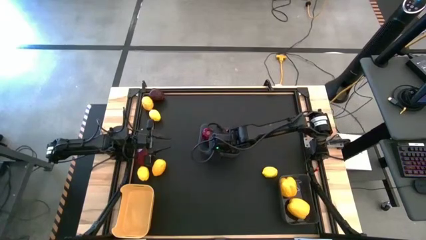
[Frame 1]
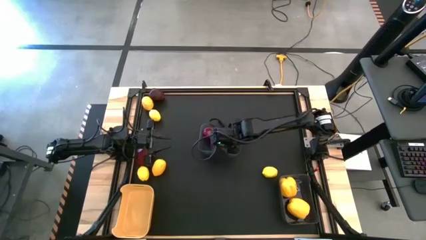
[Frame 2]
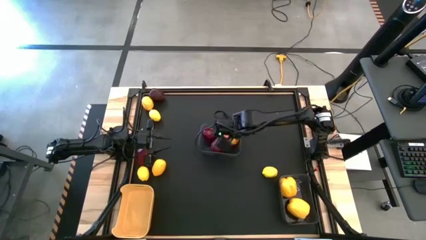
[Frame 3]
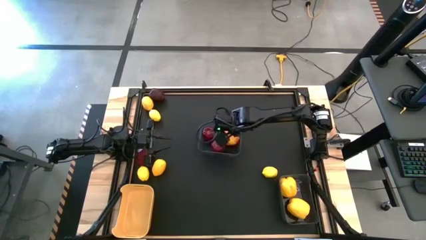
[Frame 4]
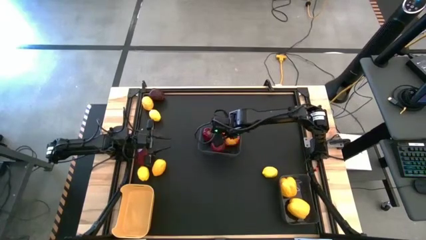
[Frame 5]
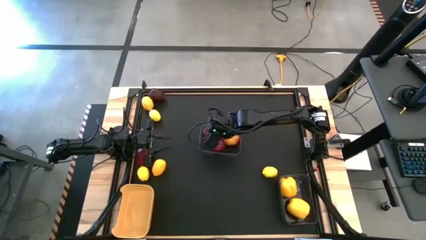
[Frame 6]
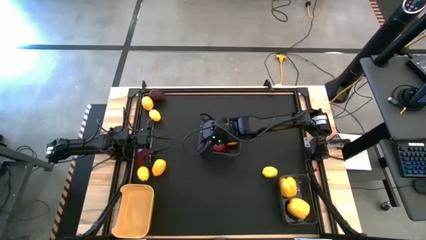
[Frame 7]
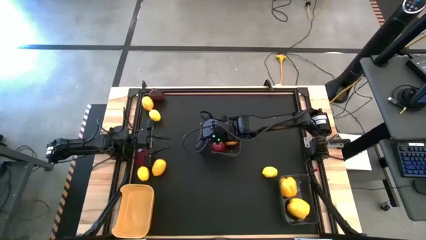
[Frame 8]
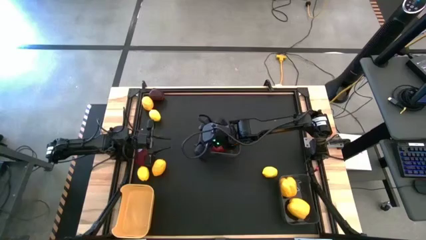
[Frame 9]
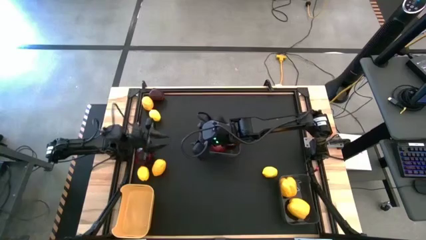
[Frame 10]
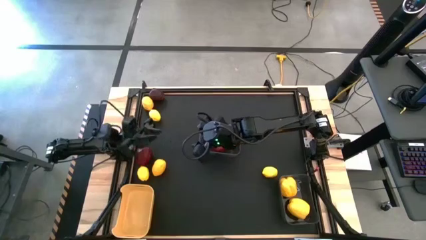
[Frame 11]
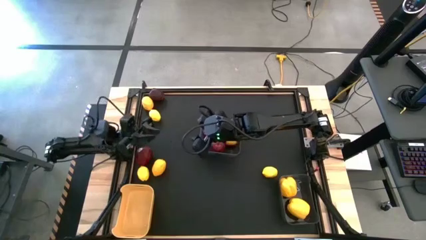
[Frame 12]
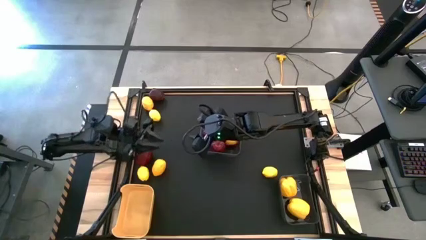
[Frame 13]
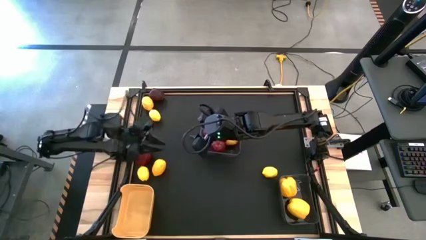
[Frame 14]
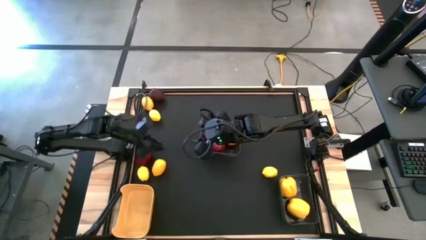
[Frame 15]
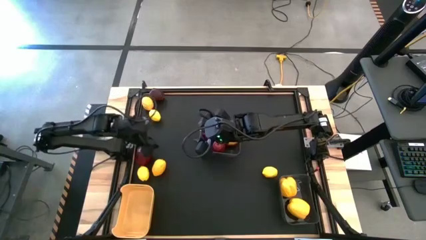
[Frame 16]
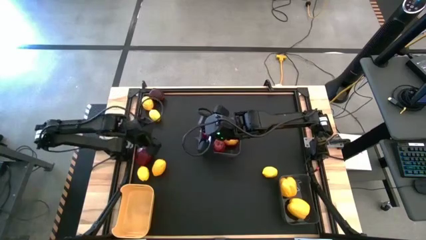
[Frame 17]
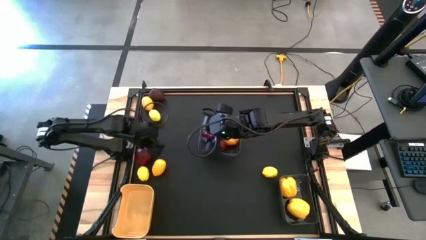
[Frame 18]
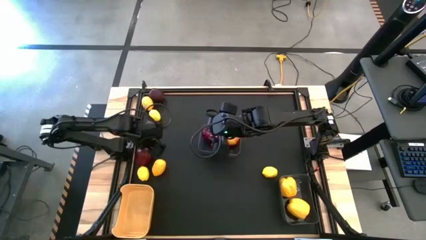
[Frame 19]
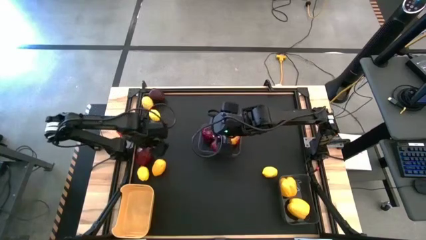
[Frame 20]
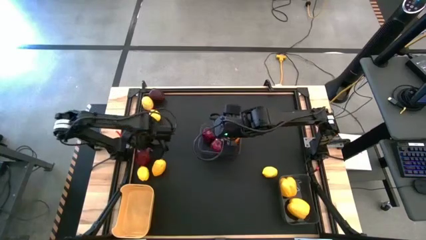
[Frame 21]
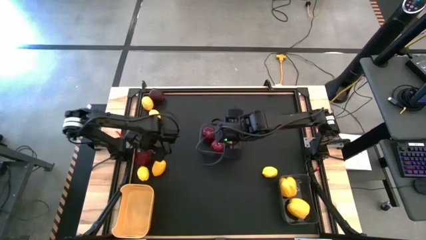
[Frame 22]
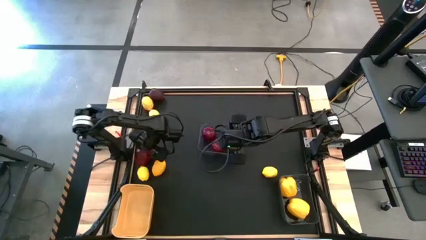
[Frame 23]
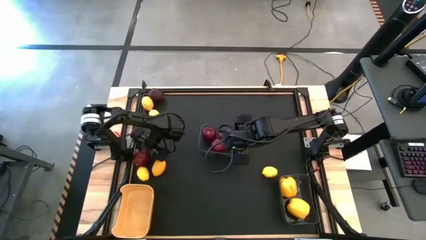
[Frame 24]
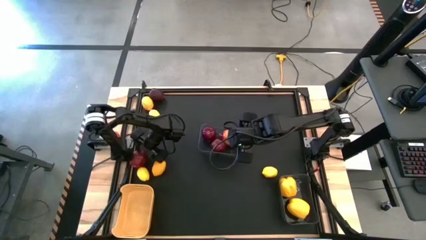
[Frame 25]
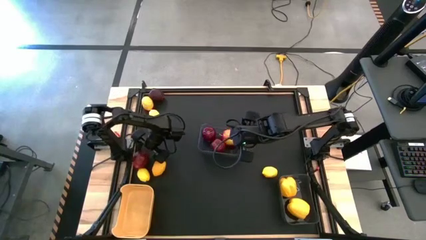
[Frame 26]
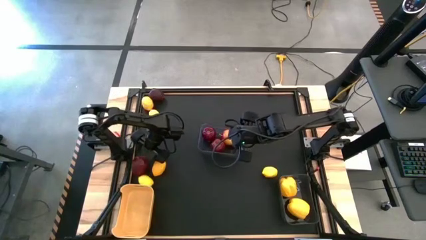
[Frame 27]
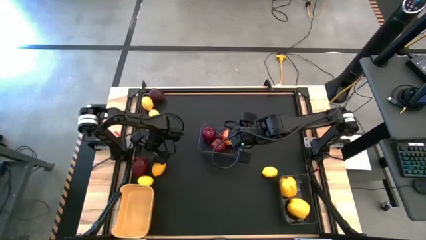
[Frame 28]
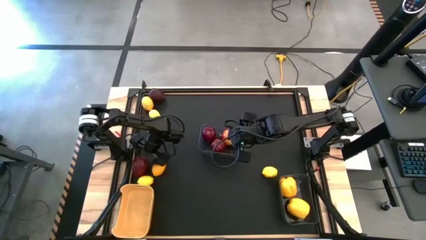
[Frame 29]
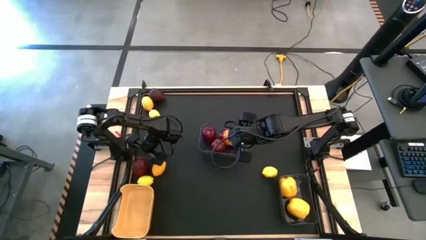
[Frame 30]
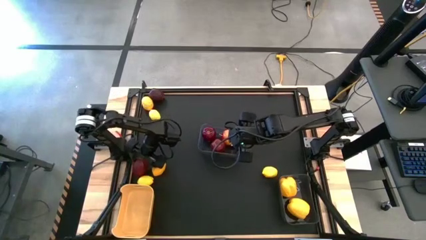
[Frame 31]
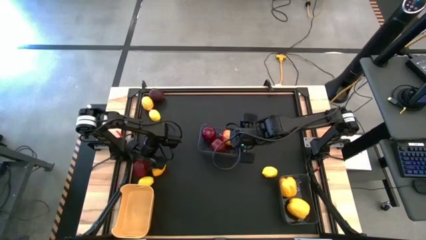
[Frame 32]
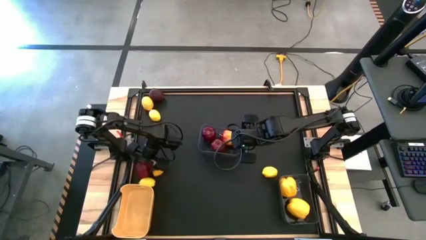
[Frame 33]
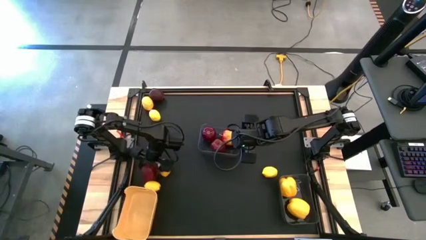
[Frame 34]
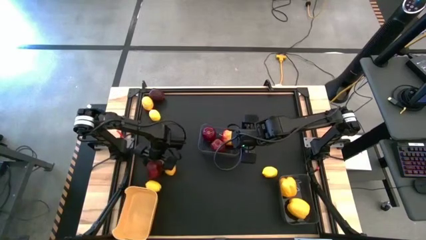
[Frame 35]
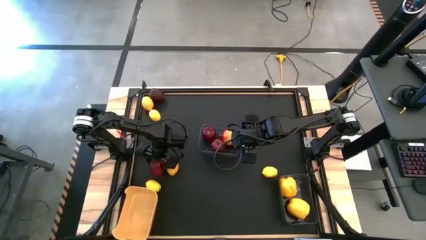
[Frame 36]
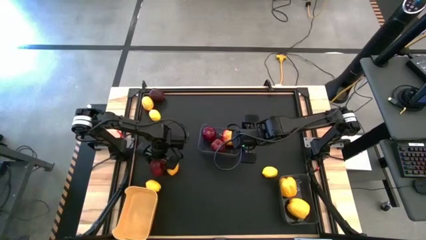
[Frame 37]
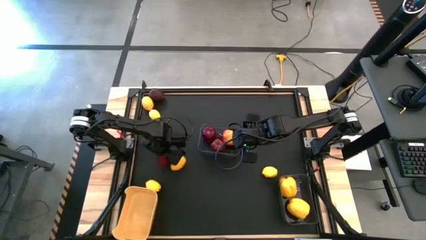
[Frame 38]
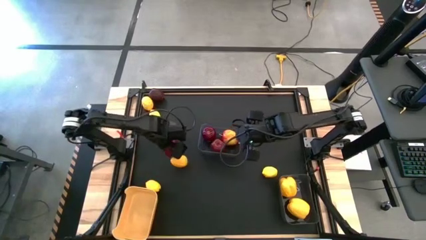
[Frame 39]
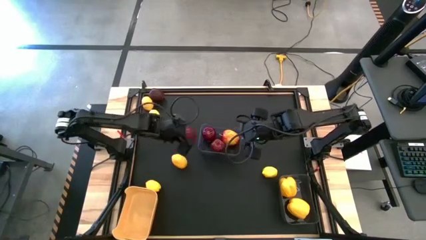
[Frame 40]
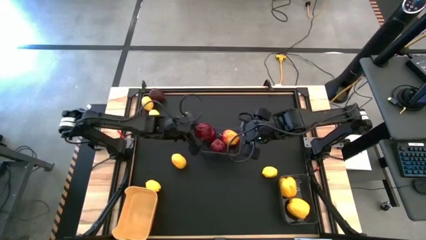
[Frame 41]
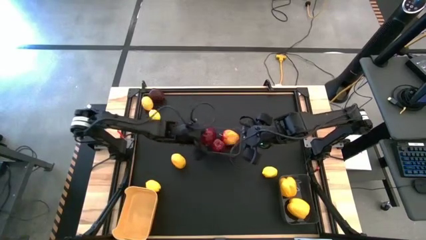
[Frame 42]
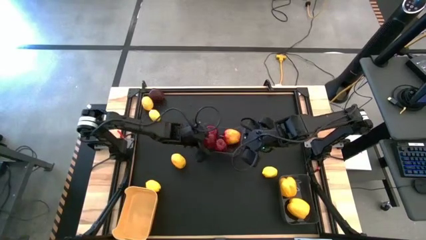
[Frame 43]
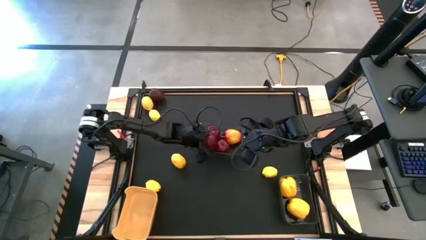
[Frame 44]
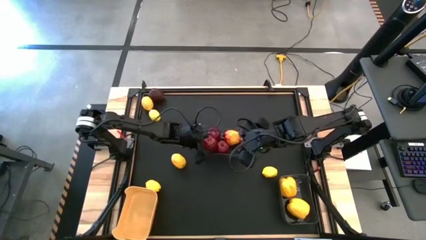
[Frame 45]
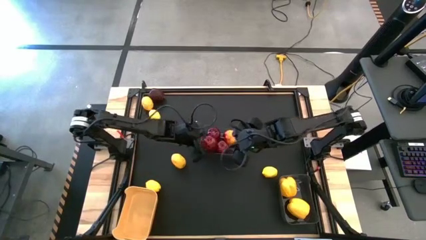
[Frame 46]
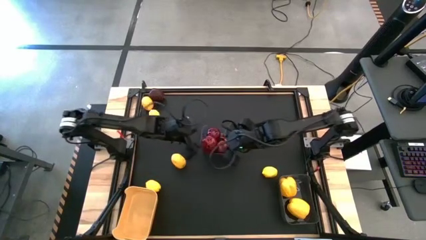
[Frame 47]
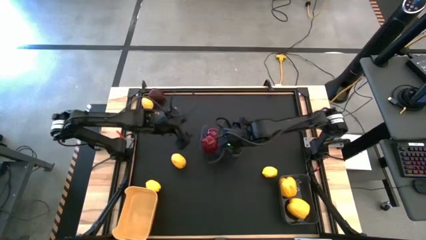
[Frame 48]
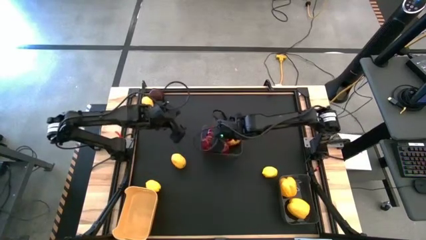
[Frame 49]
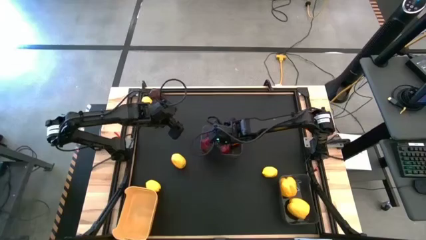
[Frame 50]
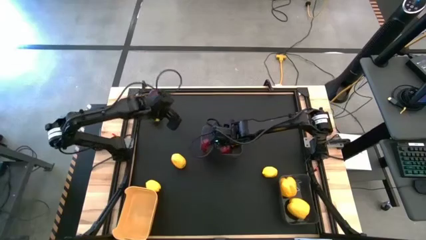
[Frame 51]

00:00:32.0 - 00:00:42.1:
Task: Sort produce into baskets
Put the red apple into the top black bin

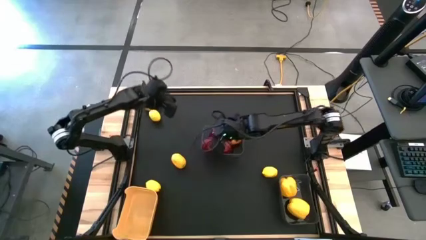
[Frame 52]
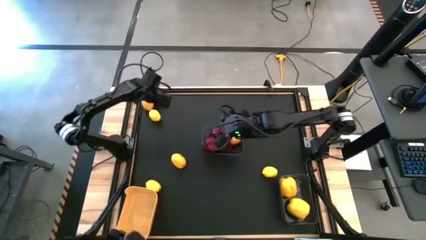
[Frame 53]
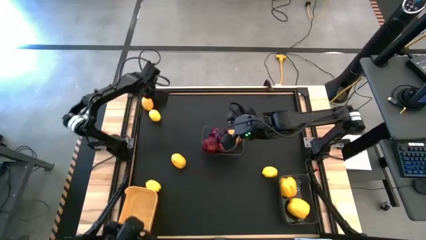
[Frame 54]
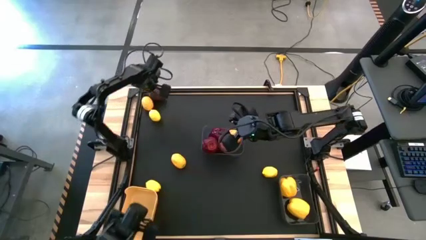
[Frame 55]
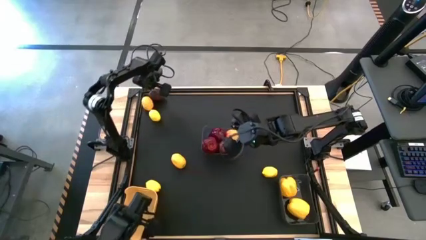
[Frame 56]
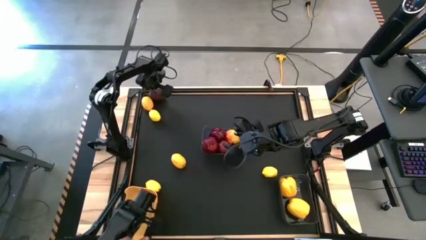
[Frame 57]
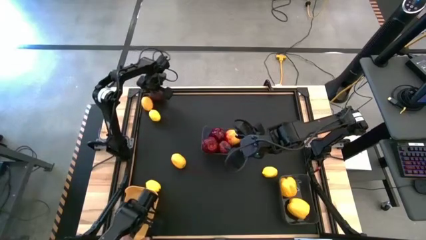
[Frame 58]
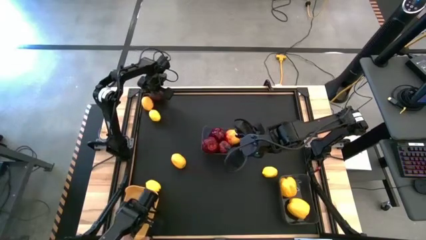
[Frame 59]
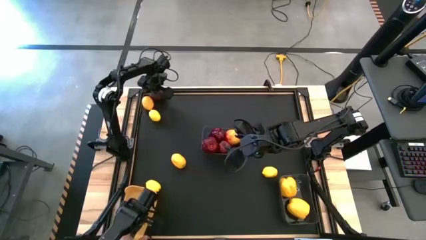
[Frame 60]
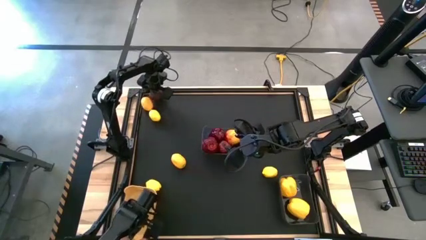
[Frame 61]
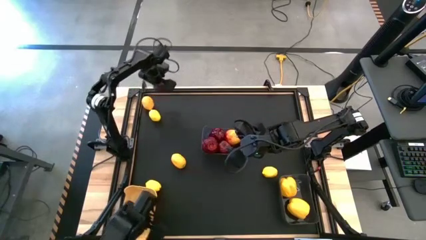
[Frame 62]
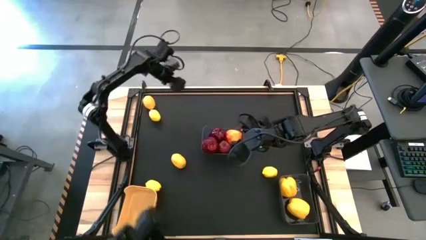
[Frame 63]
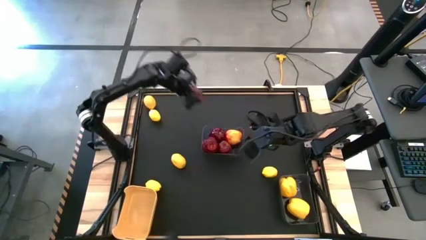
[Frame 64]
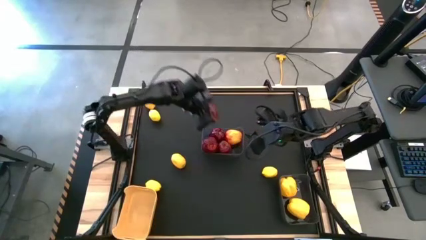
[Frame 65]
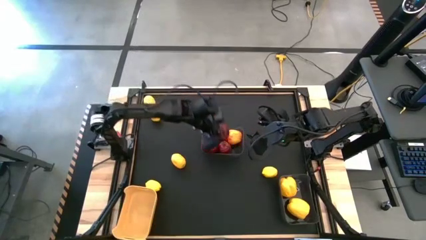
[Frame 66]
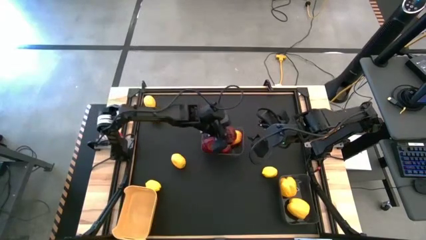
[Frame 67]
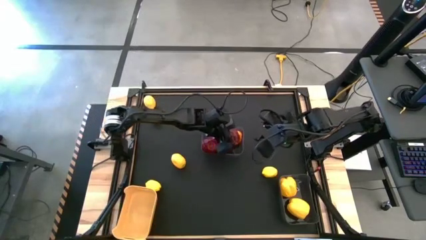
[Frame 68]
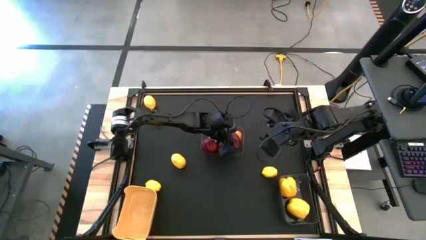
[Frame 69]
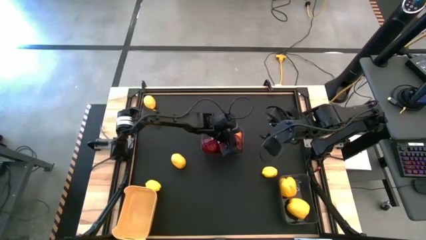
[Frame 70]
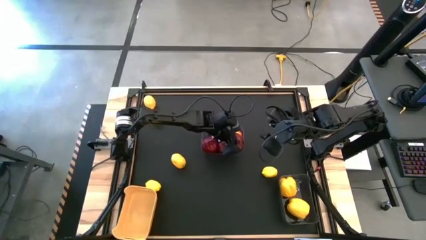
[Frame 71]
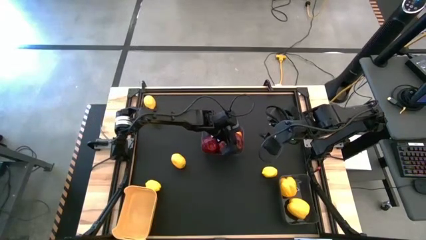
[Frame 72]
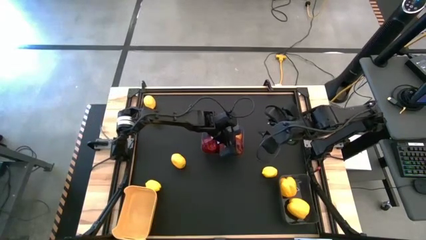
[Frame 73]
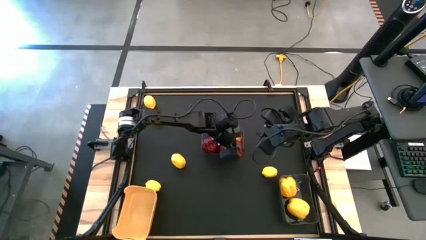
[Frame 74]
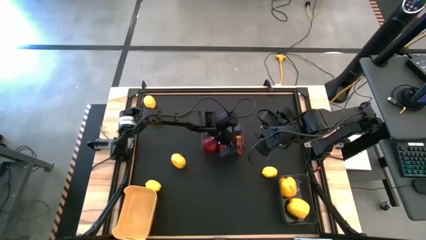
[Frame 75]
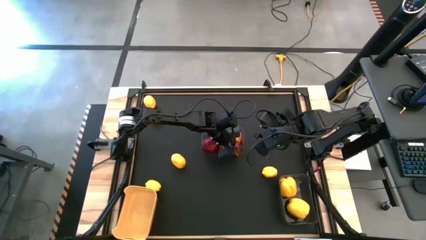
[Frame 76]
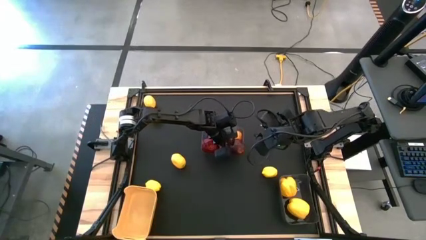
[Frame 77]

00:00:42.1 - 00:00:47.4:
Put the red apple into the top black bin

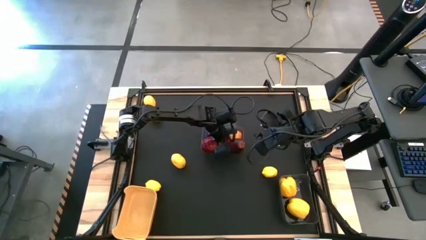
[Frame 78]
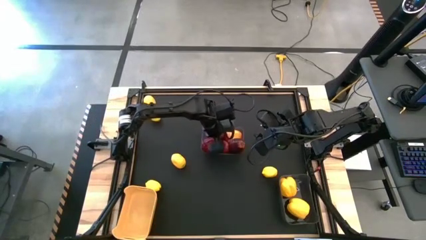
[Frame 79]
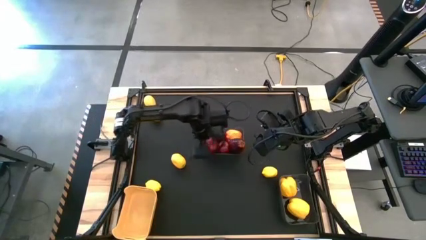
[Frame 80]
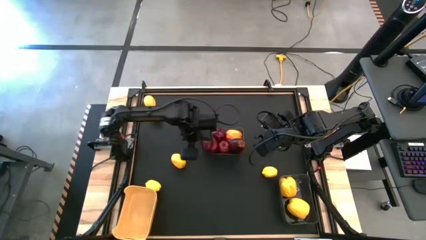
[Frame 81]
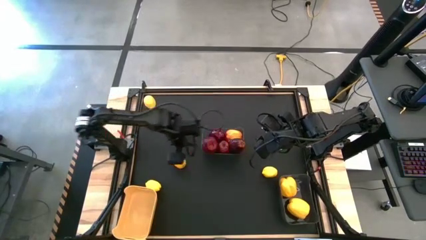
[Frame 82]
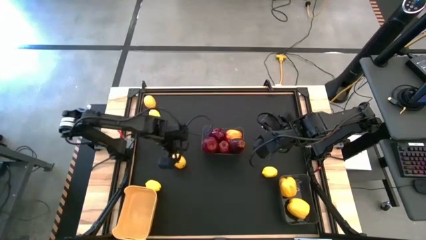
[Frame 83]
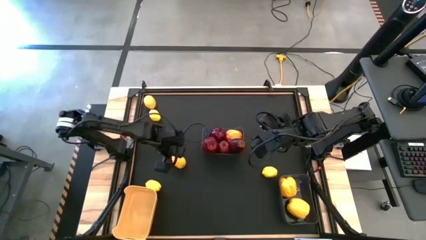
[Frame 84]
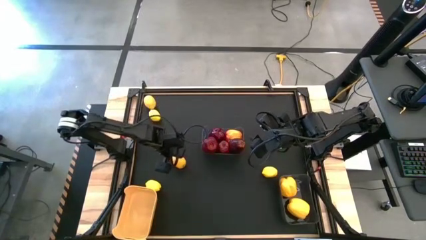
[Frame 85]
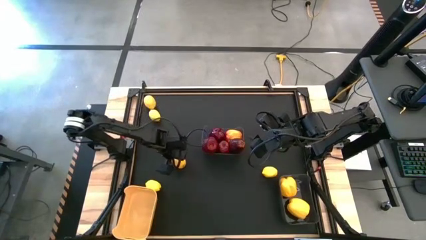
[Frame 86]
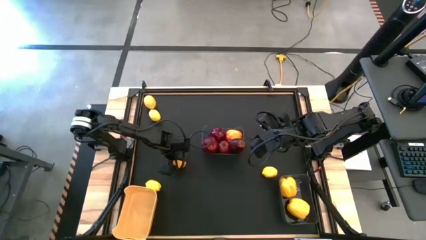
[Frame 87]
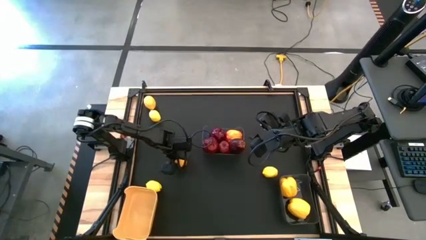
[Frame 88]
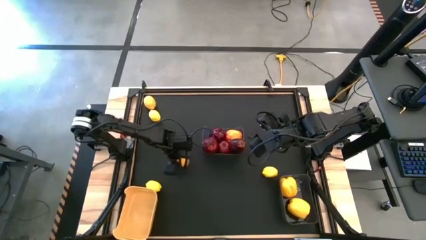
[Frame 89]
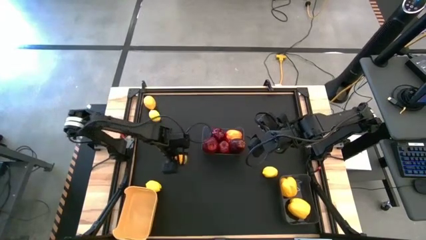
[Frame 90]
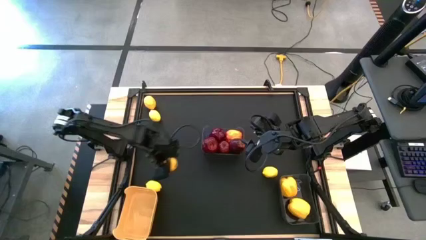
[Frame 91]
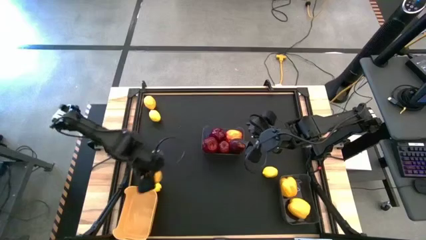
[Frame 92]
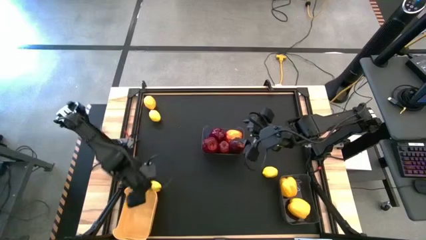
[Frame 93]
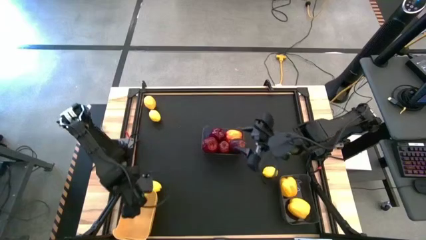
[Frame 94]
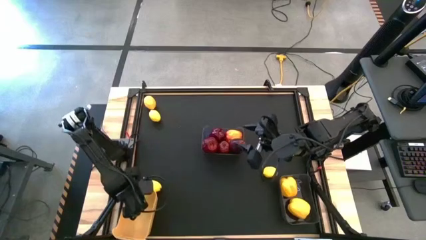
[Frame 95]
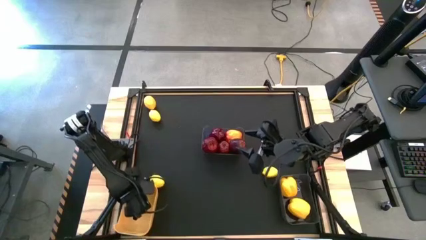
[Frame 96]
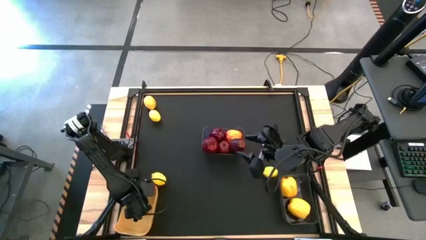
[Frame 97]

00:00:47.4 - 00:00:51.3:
Put the yellow lemon into the yellow bin
